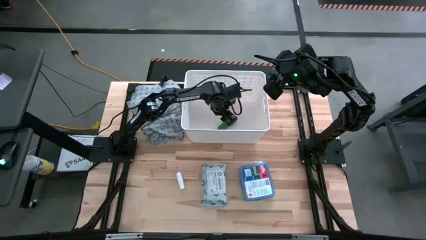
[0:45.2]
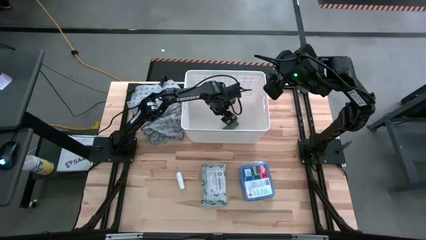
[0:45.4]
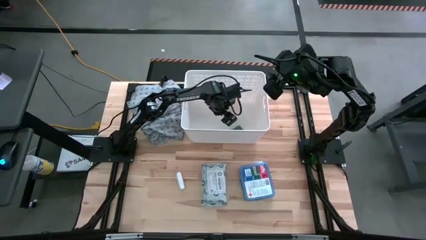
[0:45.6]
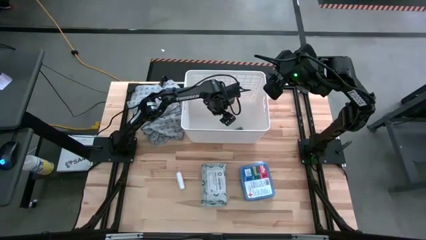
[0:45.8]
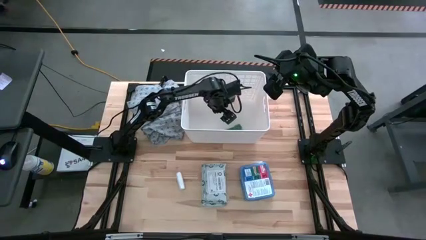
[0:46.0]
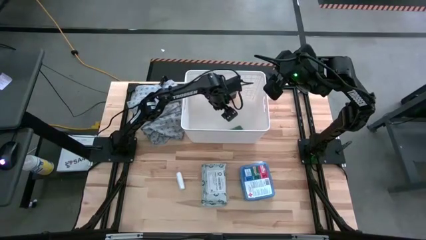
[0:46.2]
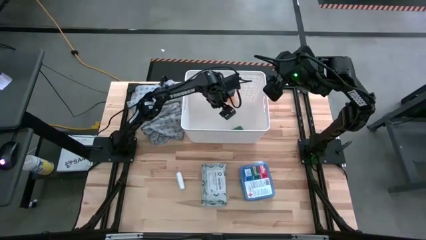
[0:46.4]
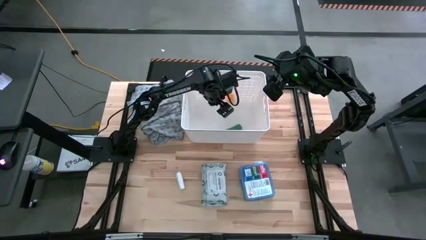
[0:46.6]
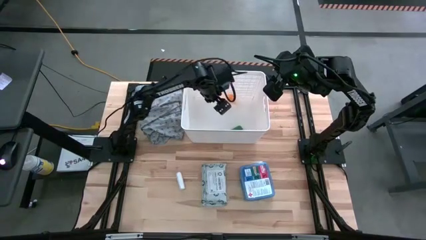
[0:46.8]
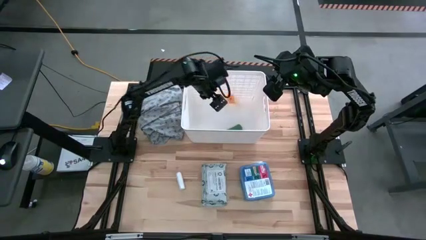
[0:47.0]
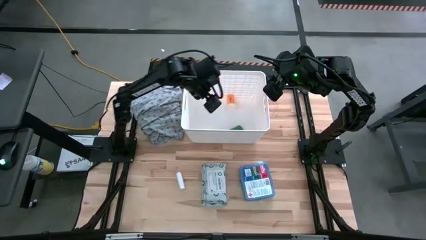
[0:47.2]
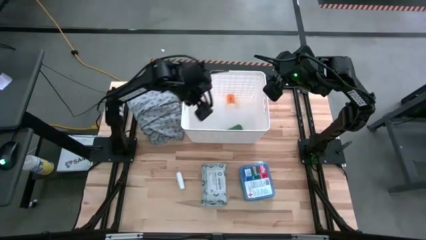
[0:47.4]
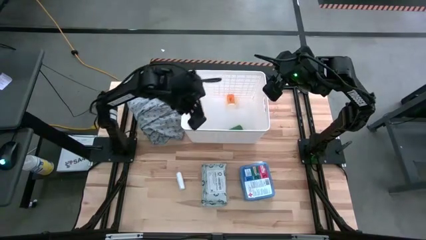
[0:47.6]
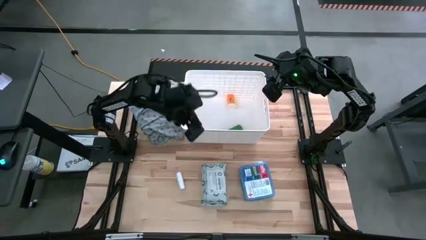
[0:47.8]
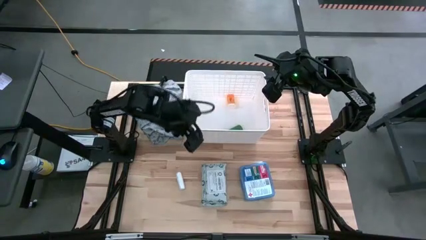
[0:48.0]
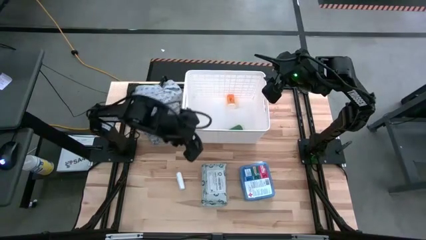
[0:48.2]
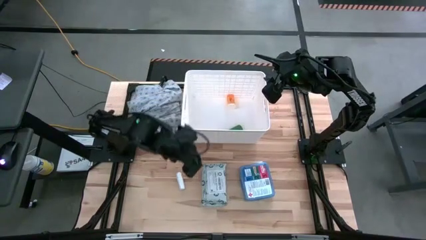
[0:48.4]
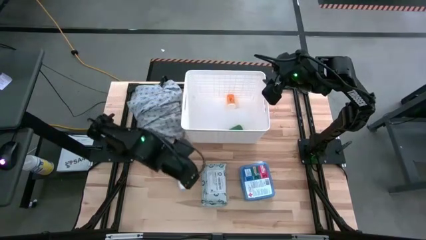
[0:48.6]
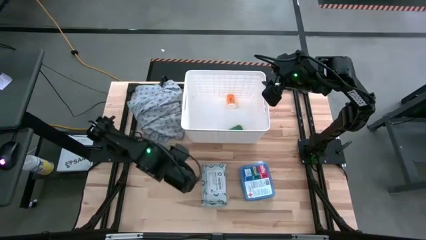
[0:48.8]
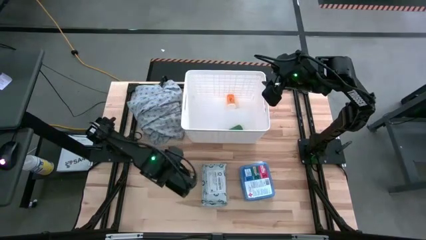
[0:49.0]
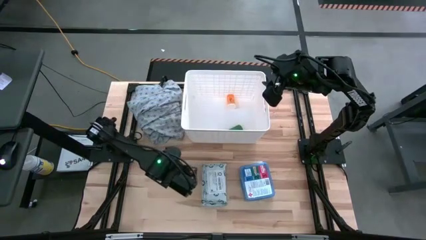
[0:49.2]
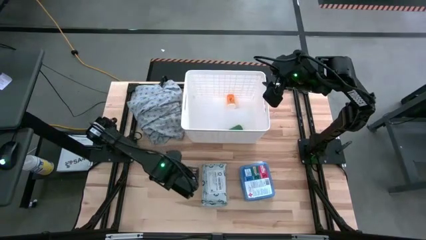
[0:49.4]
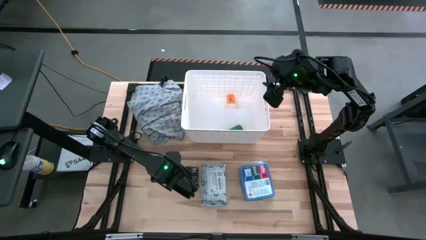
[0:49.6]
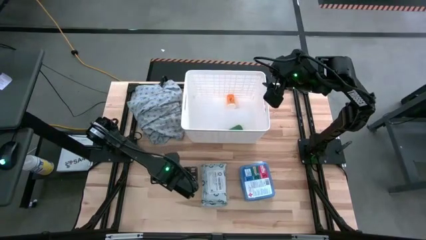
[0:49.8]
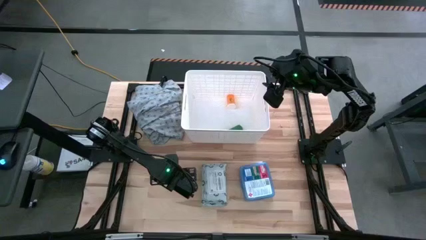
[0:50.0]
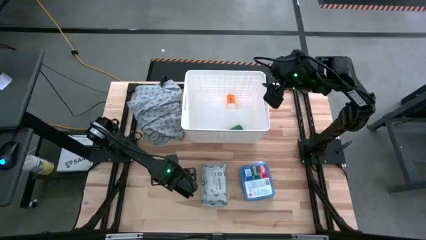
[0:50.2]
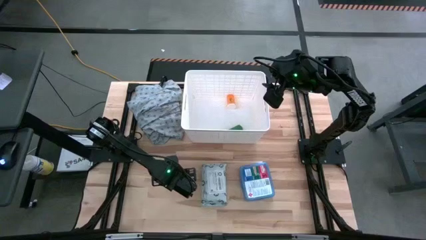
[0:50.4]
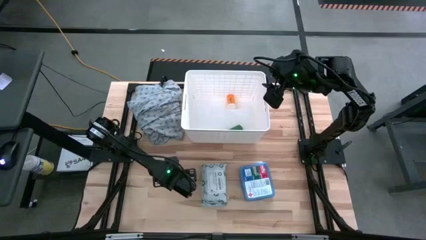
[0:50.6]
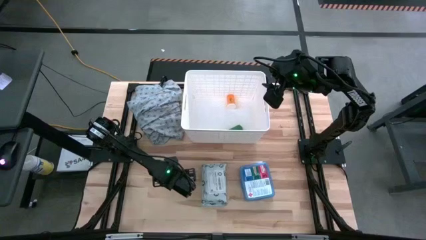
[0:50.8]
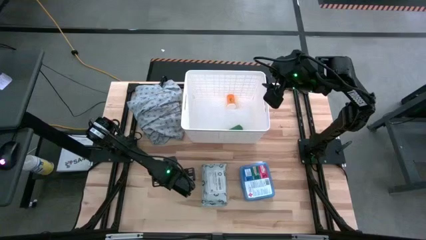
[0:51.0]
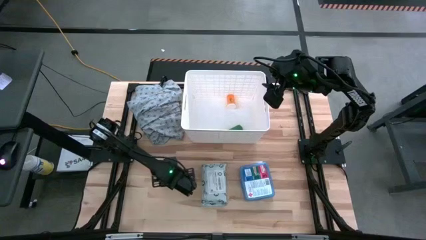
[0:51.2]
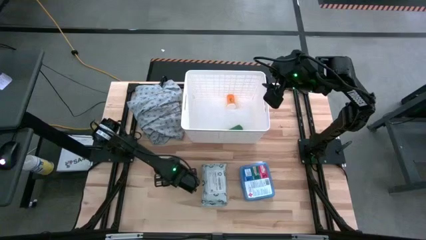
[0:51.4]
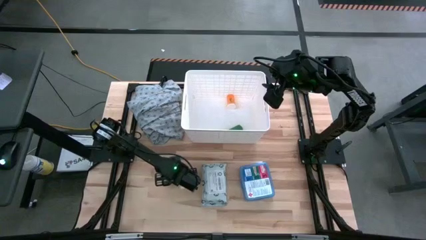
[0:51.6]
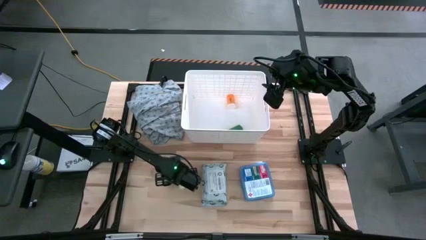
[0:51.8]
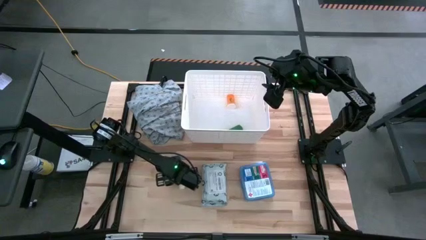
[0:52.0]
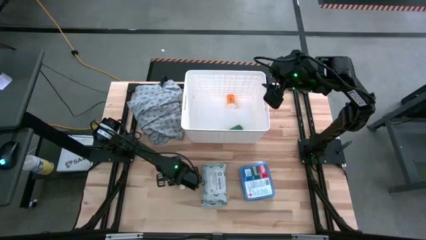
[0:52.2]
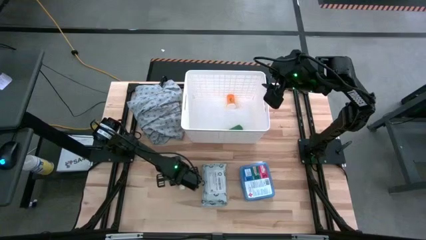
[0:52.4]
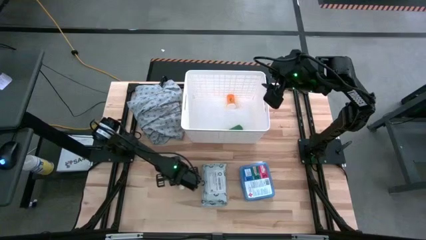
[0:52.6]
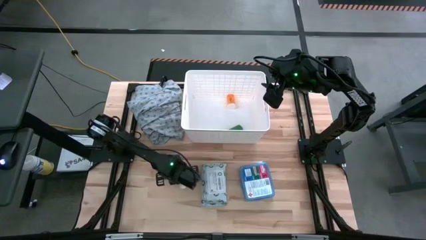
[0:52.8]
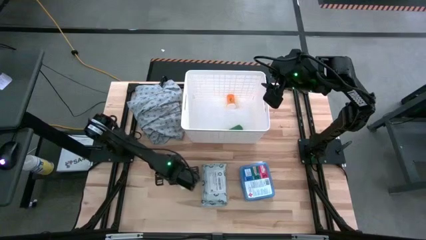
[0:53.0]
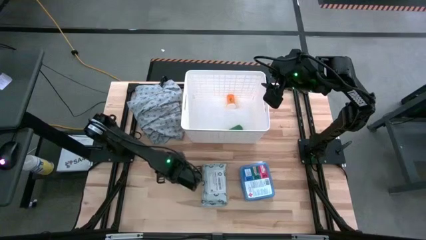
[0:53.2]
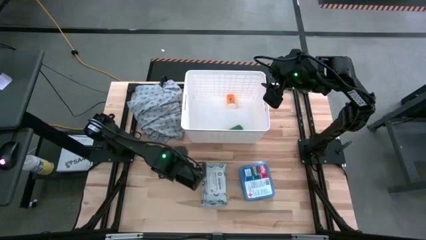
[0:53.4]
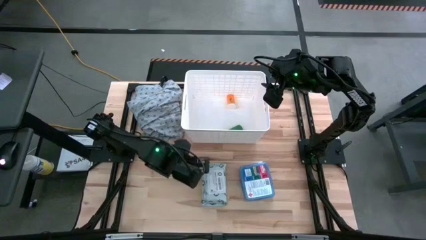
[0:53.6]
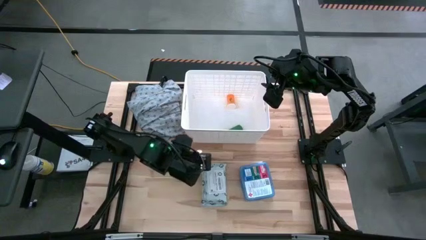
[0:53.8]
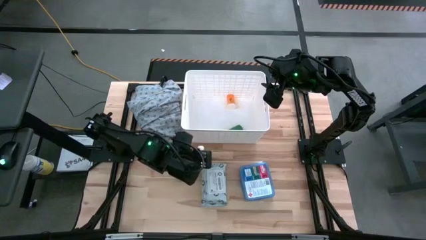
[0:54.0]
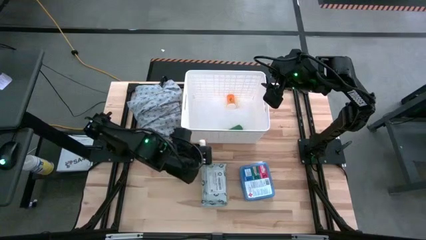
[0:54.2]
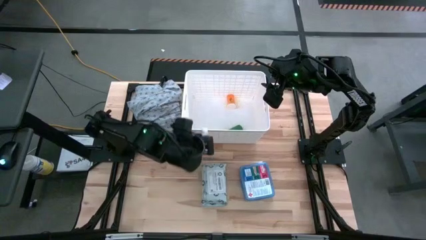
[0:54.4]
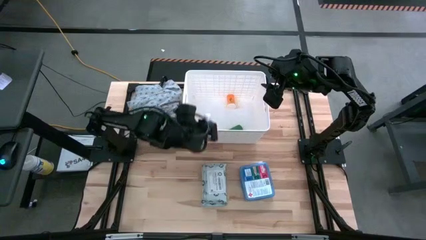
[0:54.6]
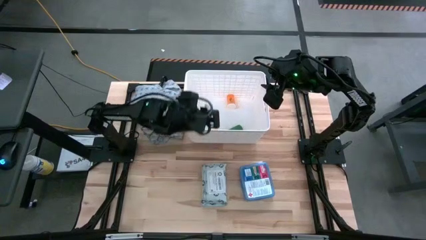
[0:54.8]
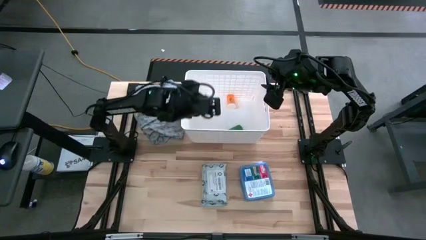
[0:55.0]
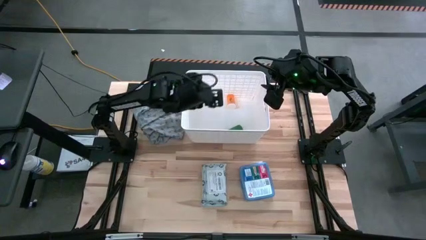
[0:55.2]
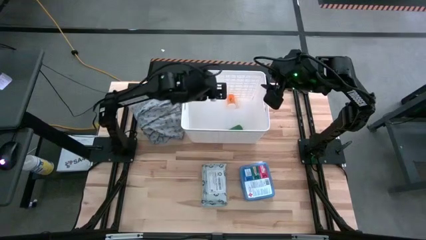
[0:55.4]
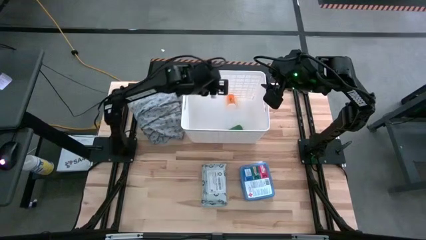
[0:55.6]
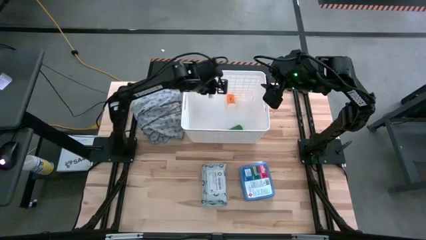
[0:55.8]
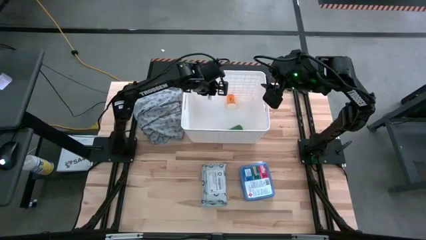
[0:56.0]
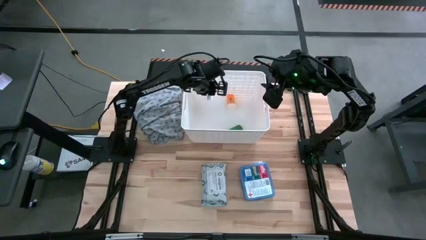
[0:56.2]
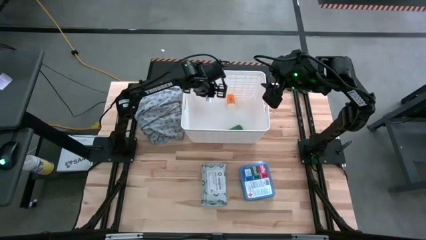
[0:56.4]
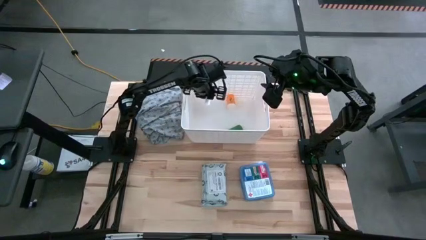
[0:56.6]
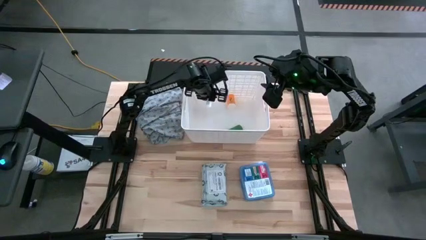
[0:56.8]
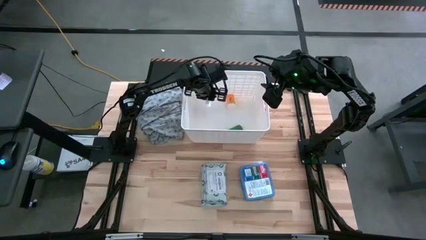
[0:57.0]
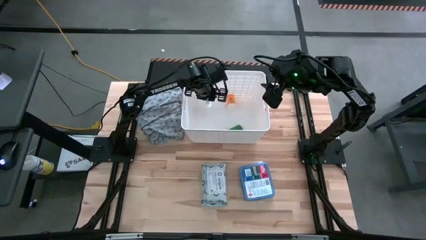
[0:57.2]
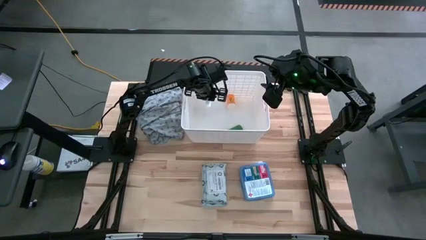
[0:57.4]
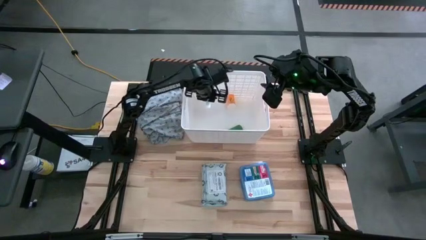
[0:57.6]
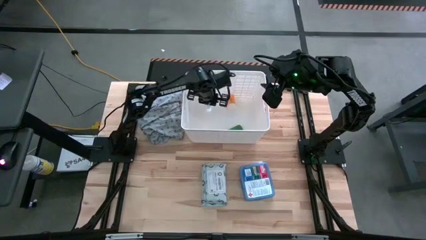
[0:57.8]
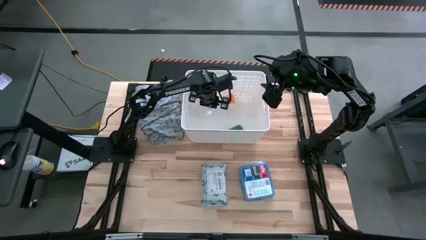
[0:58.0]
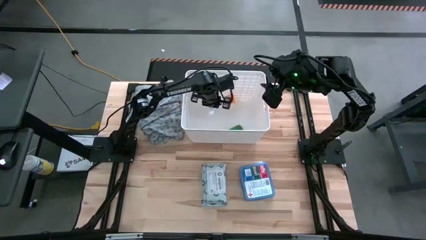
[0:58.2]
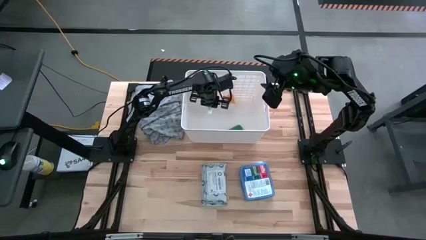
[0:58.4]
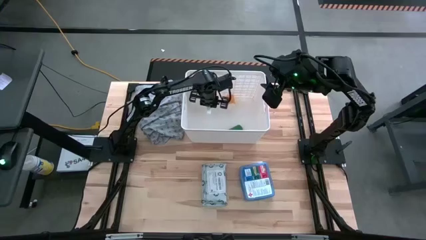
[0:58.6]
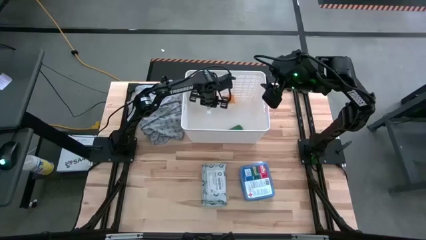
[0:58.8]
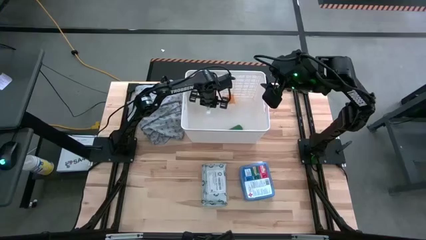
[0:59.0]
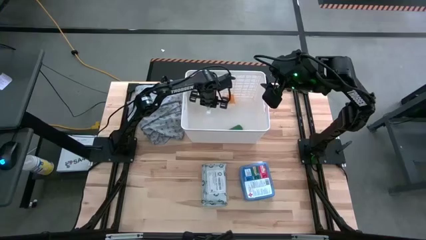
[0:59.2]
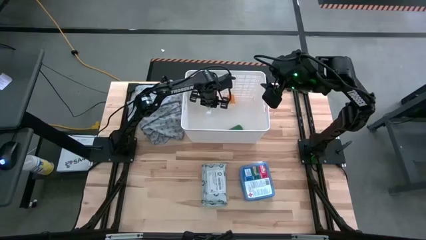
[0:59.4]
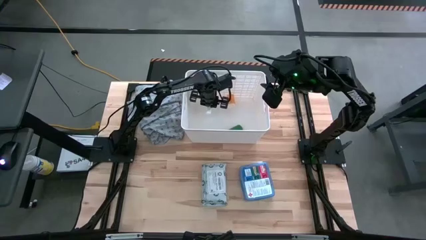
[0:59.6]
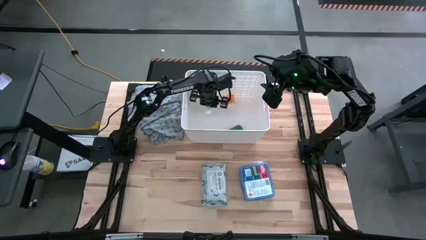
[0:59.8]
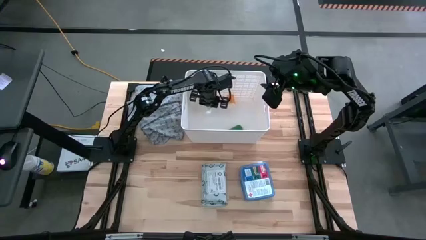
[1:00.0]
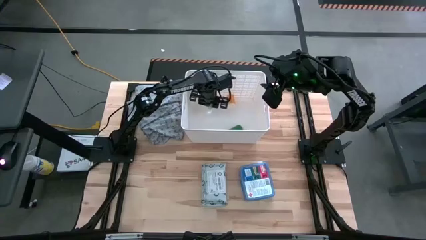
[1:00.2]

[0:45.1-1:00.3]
Task: Pick & place medical supplies in basket/bin
Put the white gauze in the white bin
